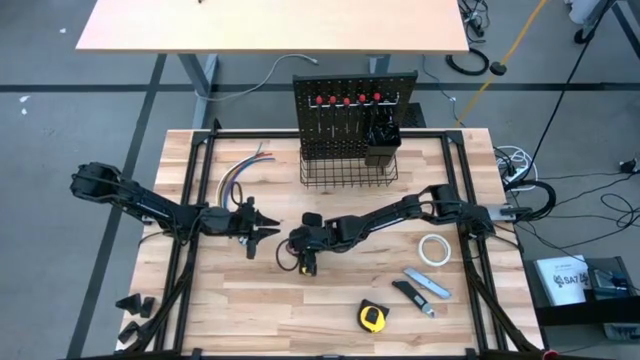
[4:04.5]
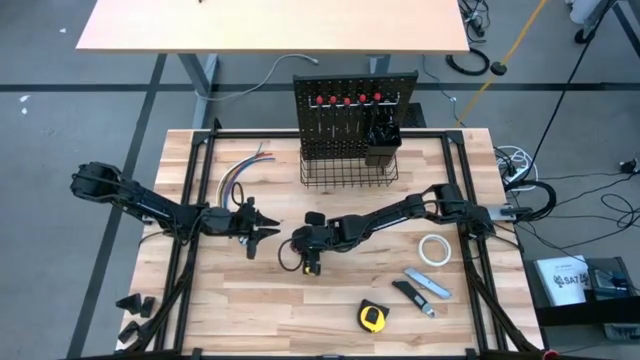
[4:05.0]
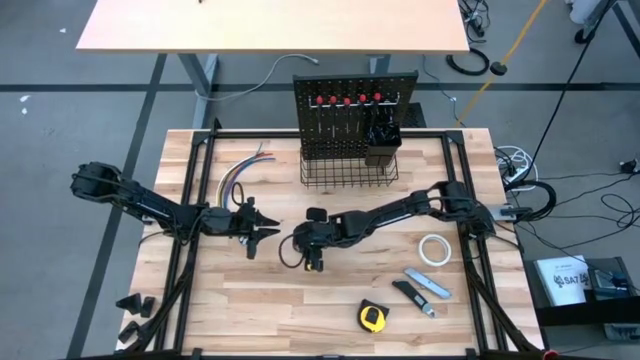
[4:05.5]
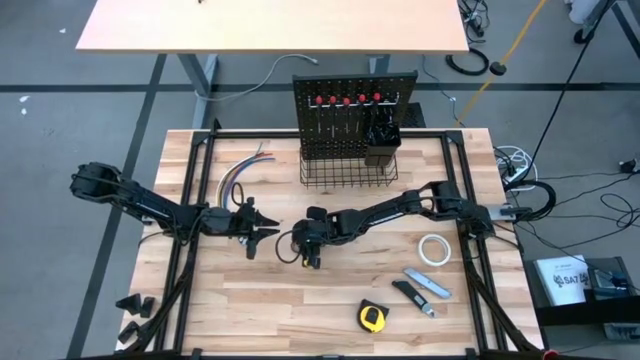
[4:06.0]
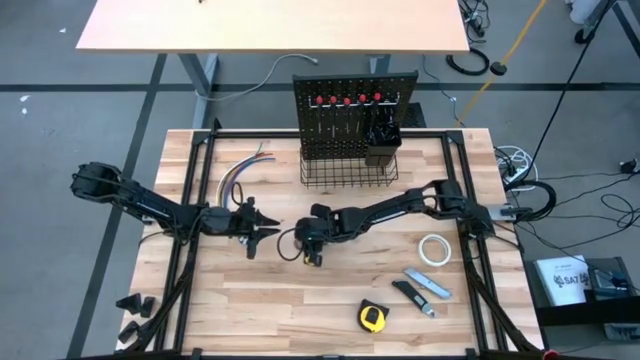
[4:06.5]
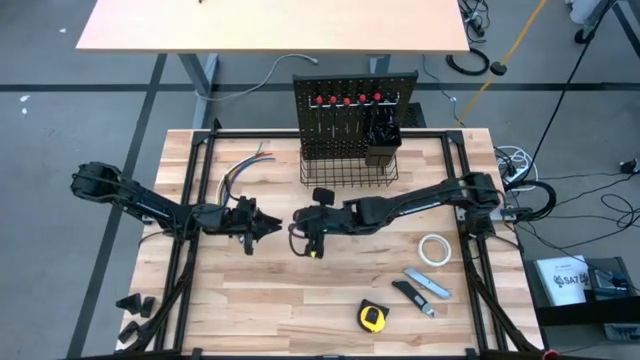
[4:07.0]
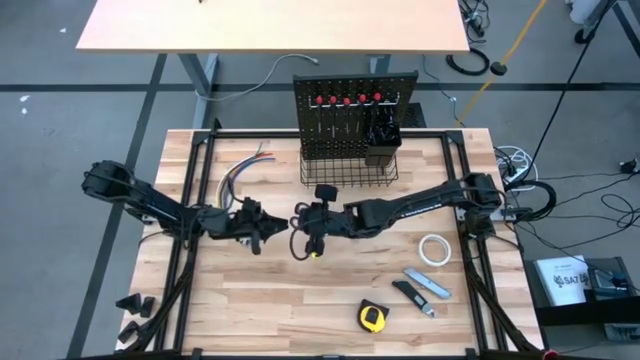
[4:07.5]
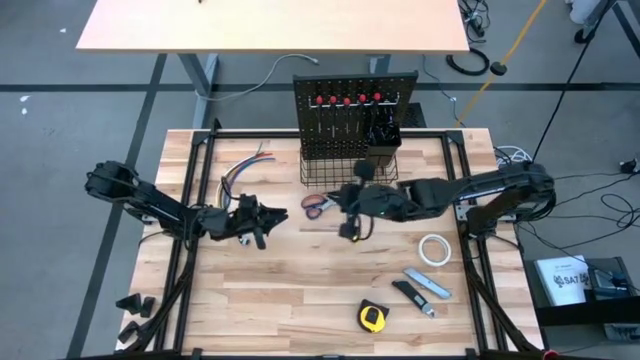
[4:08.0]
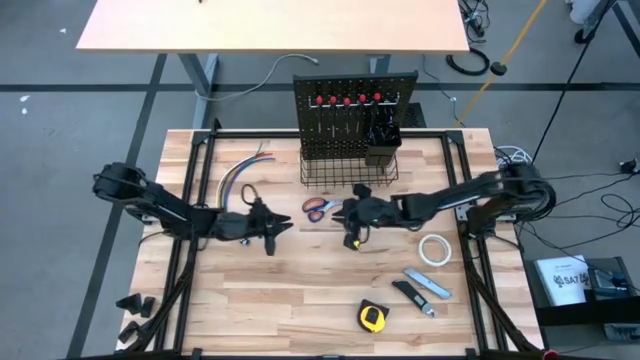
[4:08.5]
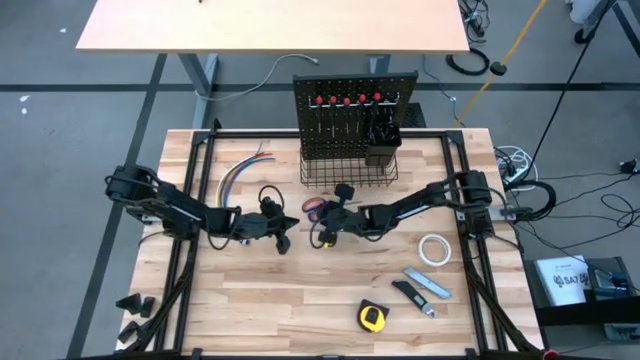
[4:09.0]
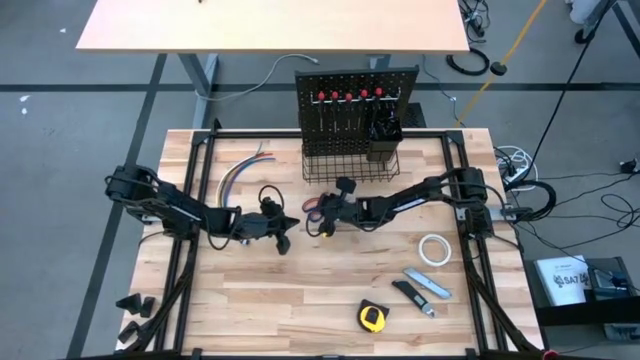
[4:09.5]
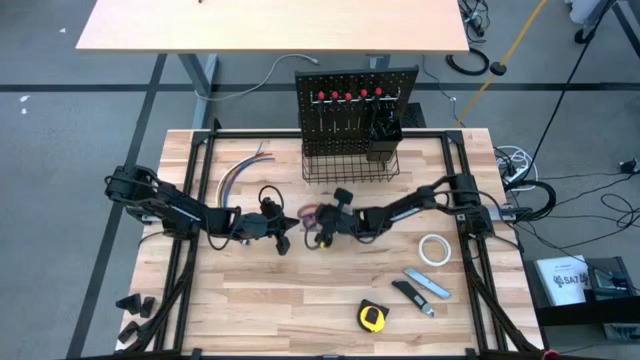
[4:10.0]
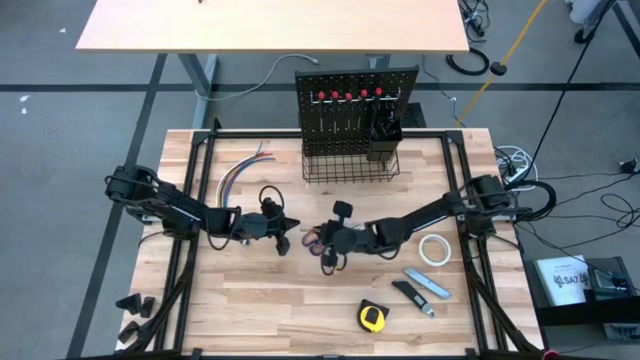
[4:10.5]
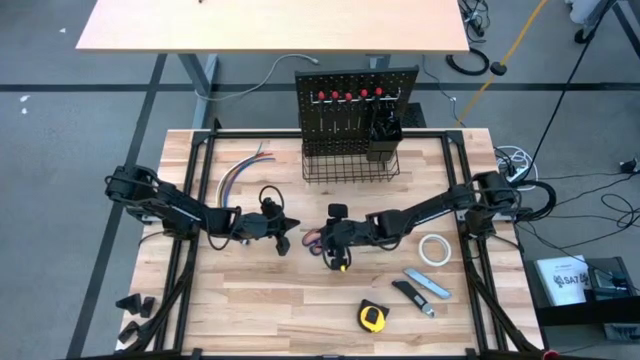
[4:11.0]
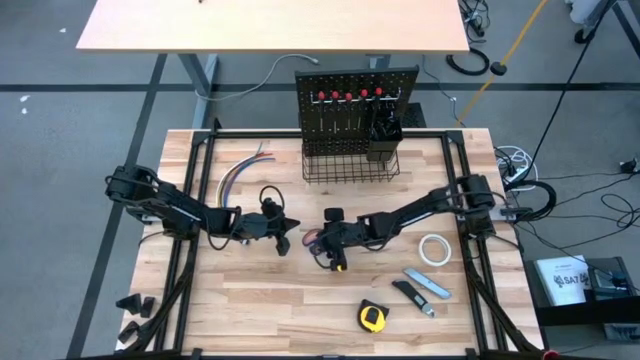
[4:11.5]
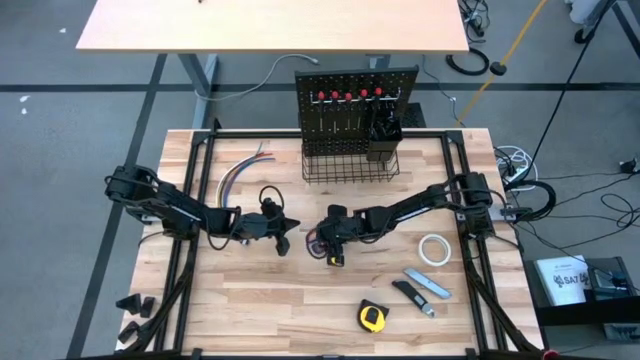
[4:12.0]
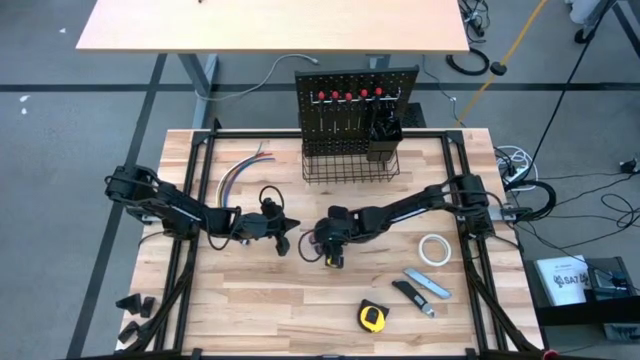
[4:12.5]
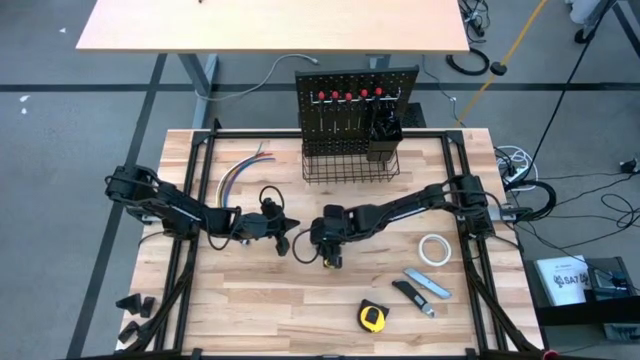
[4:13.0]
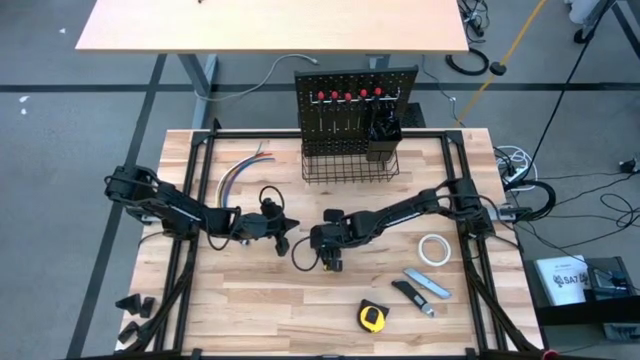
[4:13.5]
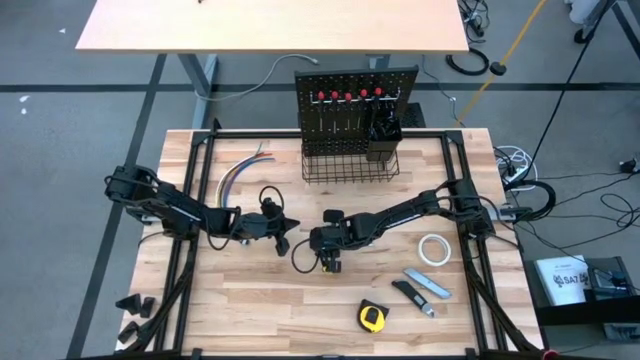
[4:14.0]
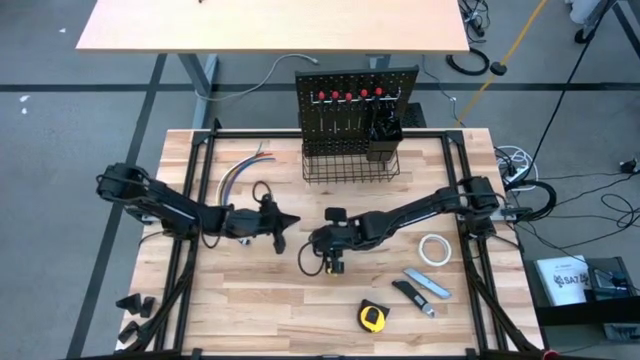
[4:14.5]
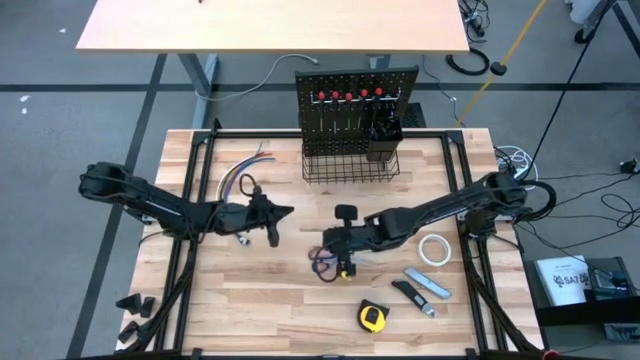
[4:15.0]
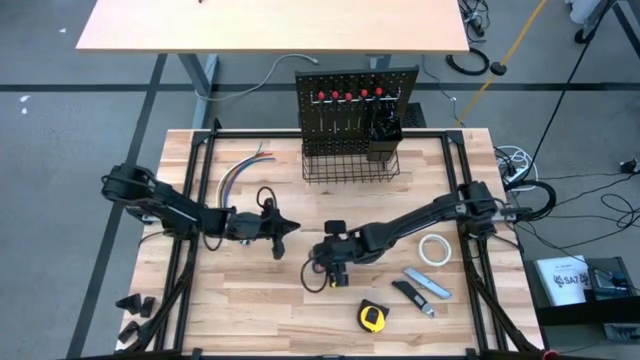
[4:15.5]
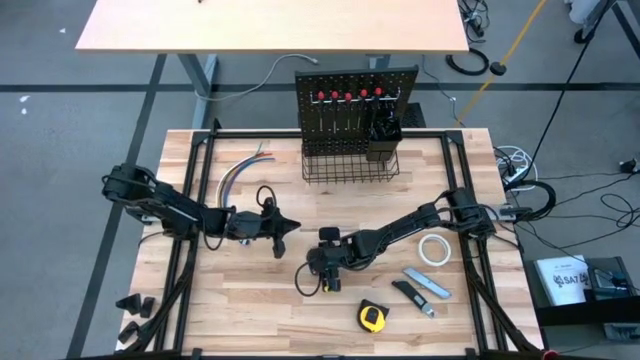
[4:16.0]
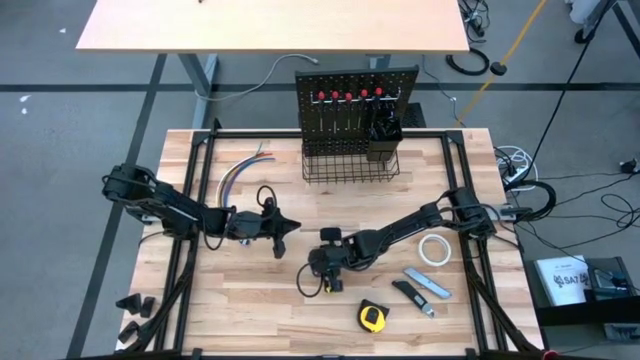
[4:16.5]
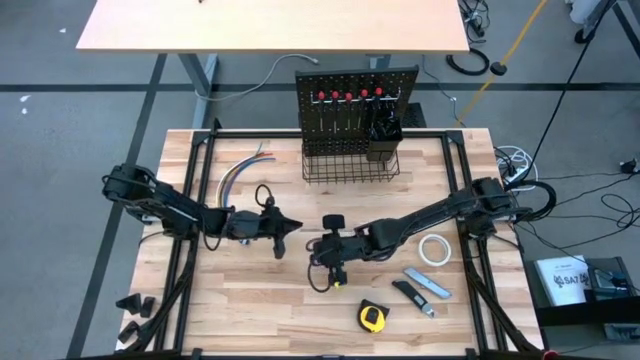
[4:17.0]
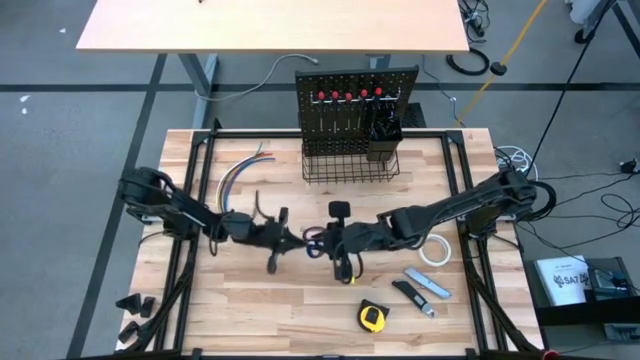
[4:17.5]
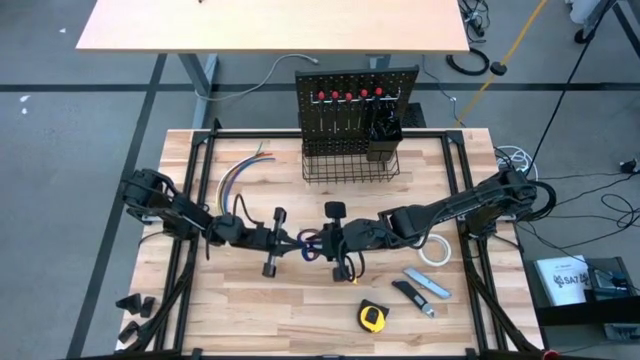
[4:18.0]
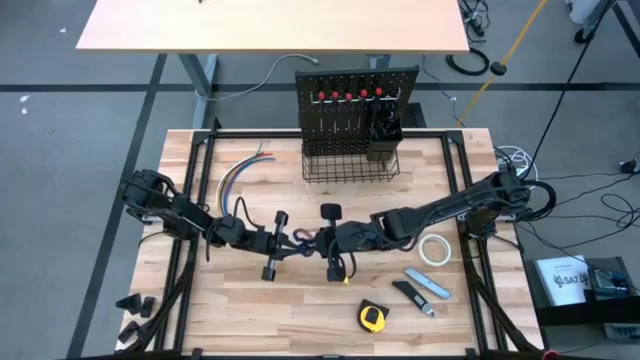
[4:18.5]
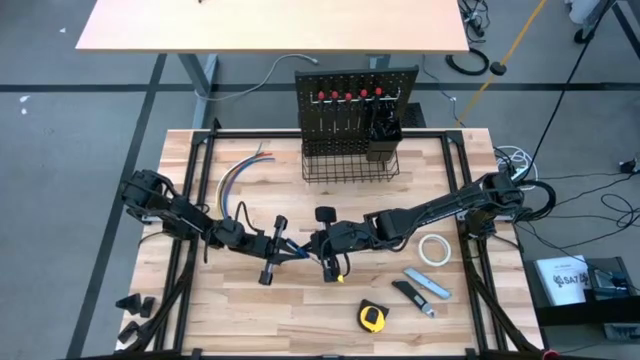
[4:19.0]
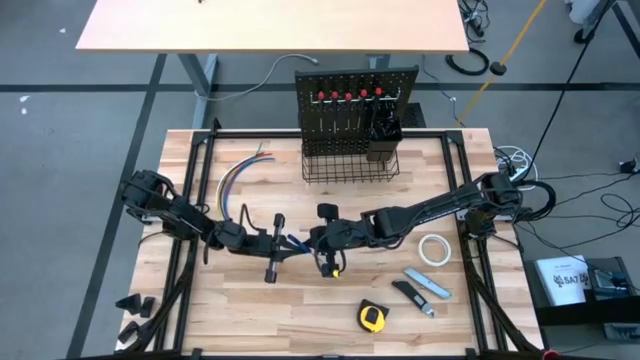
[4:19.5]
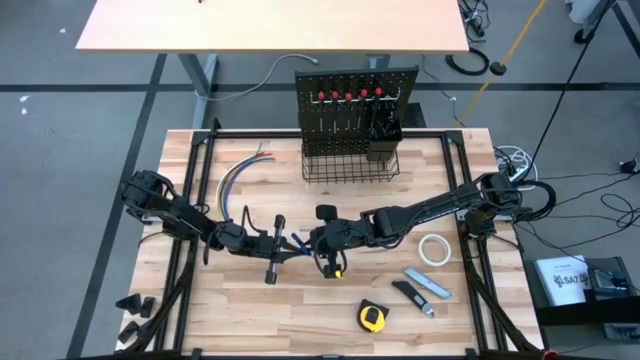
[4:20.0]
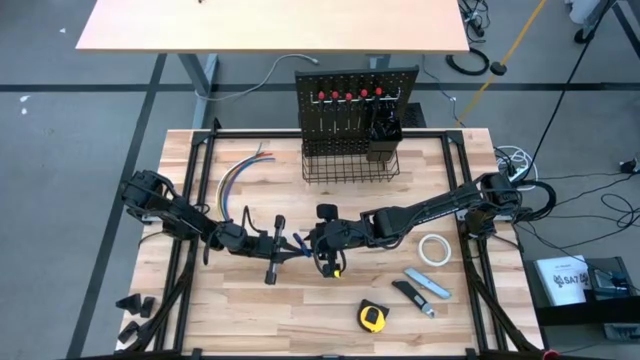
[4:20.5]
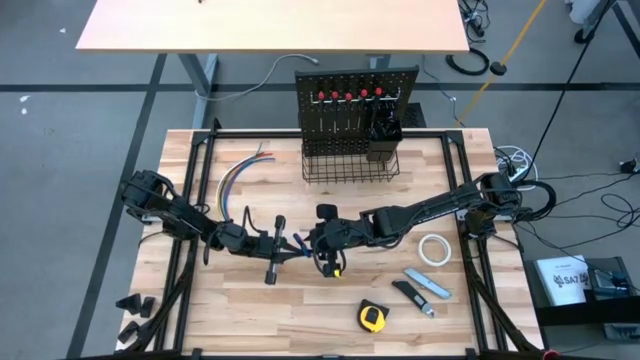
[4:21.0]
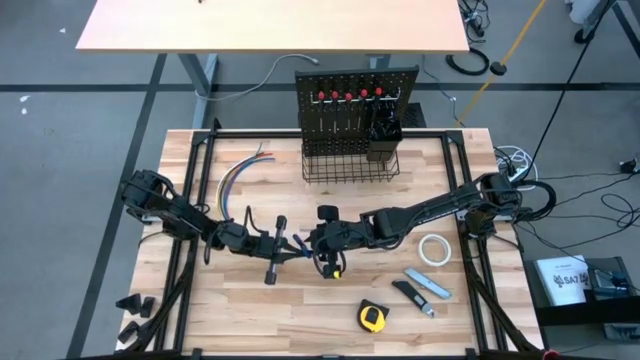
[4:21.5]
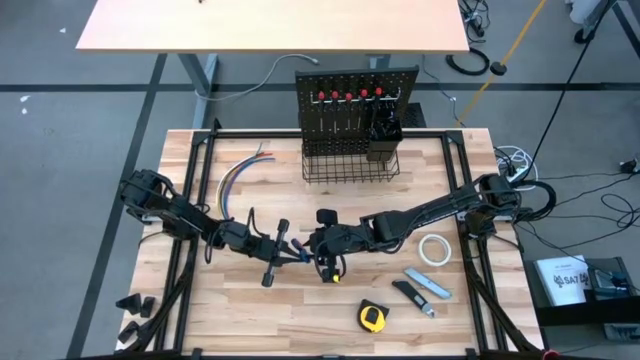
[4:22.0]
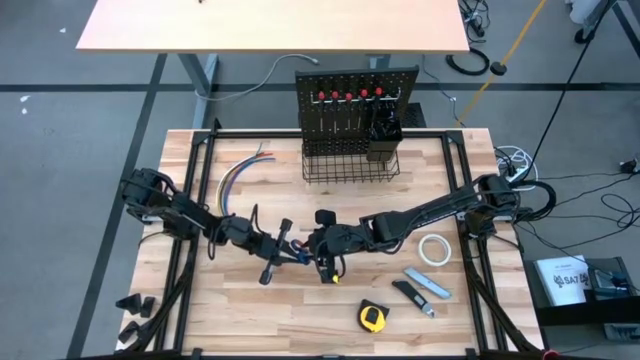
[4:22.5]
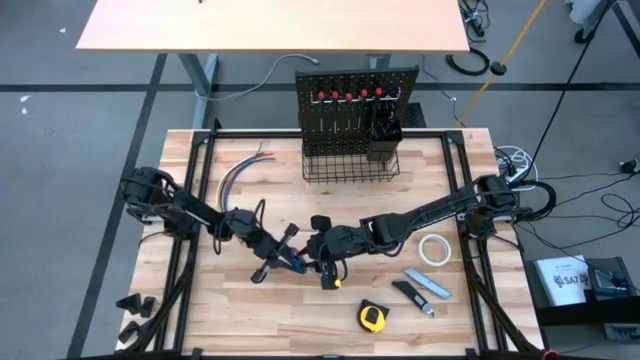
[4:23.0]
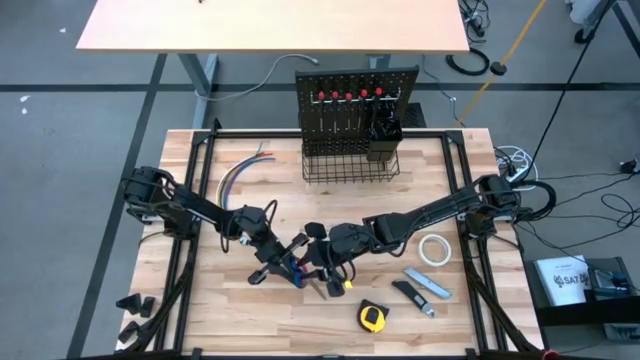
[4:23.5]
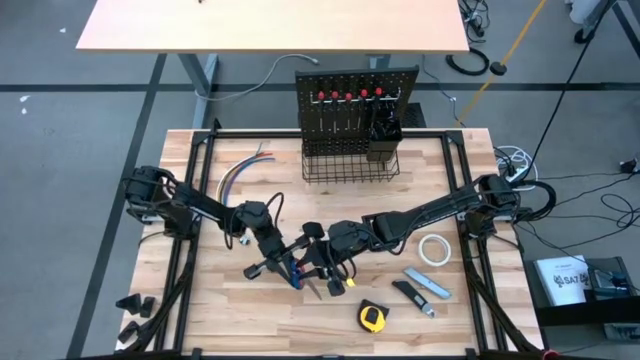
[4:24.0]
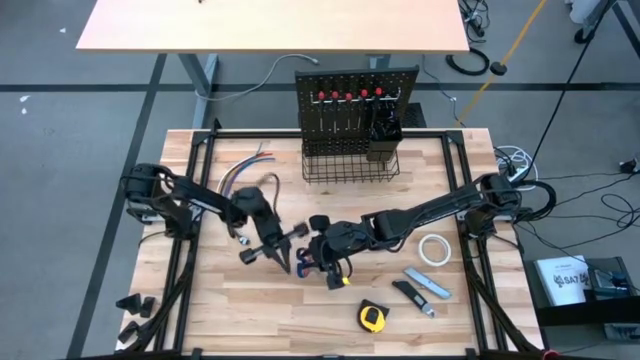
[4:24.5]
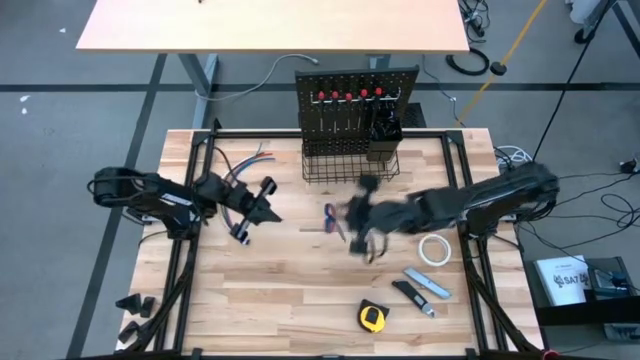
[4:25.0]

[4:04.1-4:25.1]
Task: Hang tools onto peg board
Put the scissor into the black bin on the pegboard
